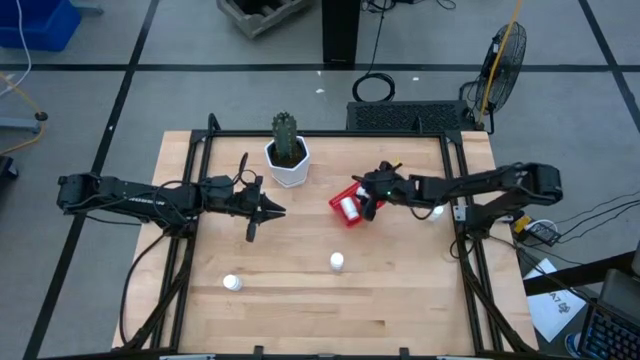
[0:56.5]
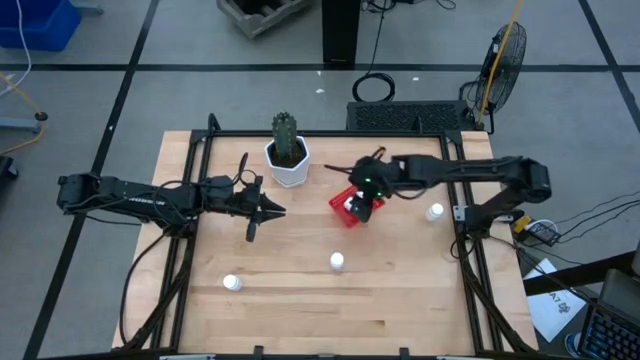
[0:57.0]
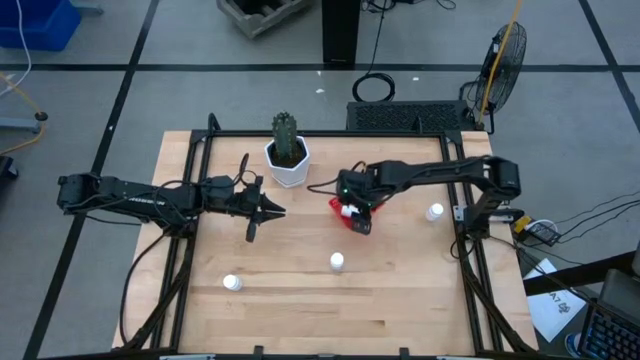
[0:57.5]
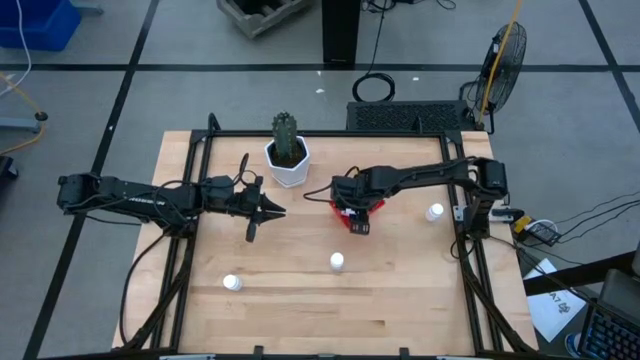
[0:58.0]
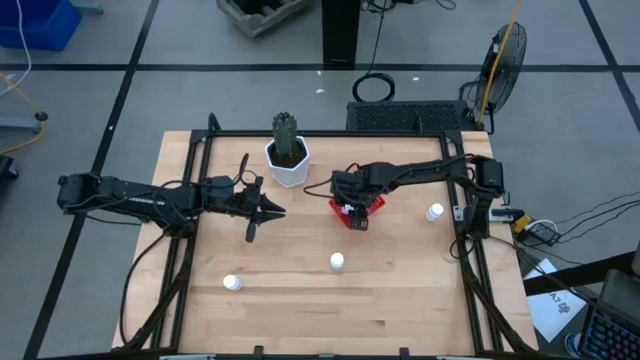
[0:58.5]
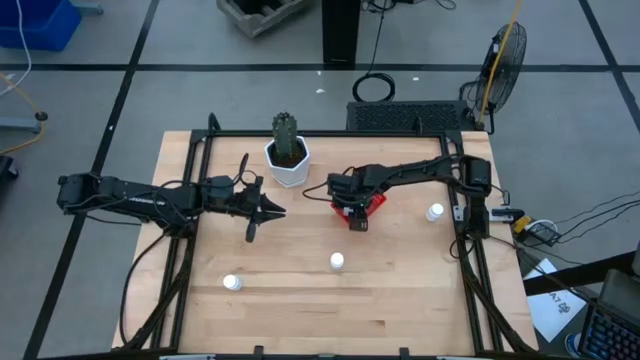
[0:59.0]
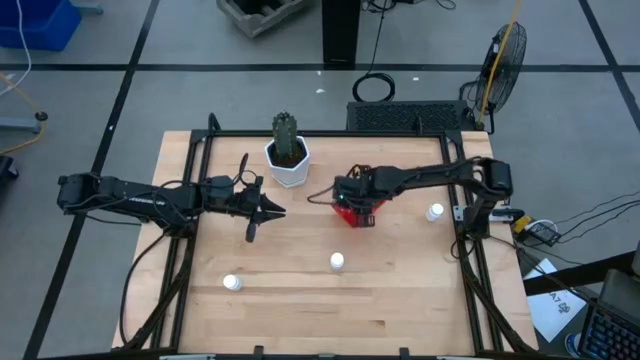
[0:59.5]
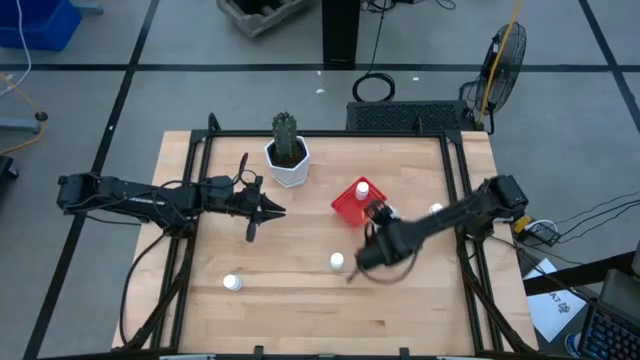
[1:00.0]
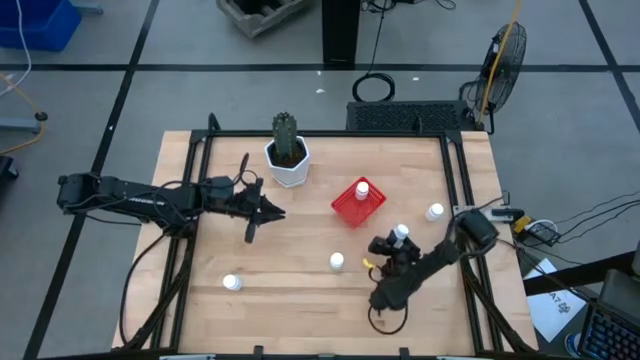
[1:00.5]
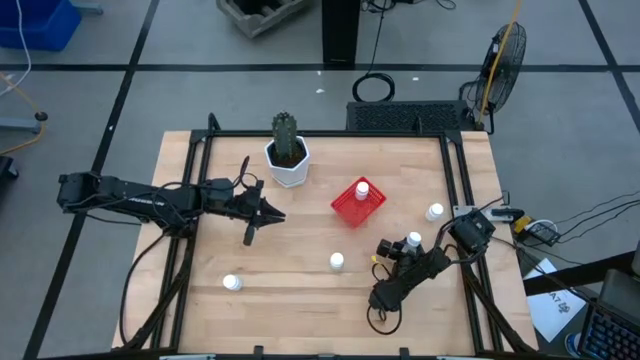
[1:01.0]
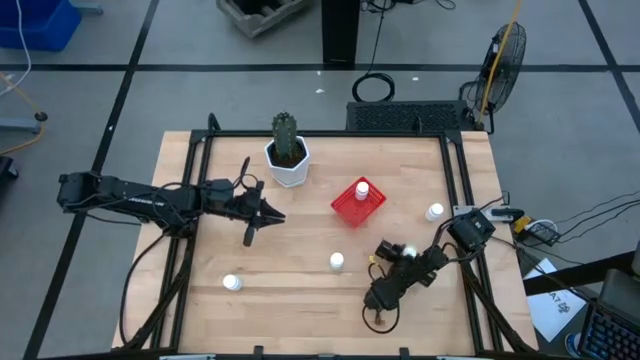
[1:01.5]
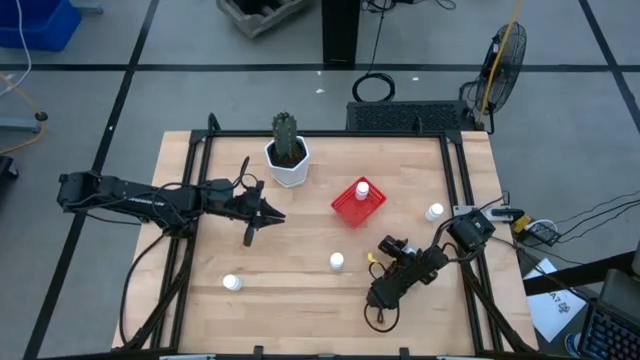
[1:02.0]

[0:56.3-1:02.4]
Task: Pick and place pill bottles into a basket
Remove the white pill bottle from the red bin

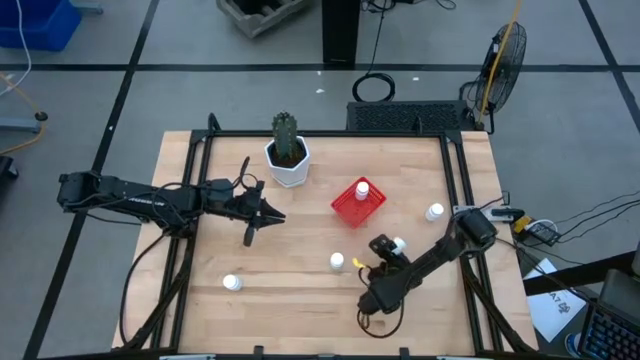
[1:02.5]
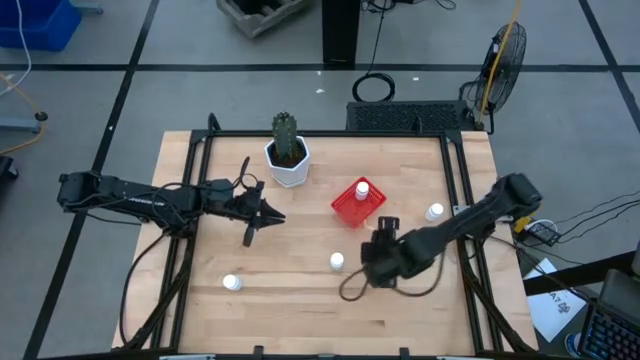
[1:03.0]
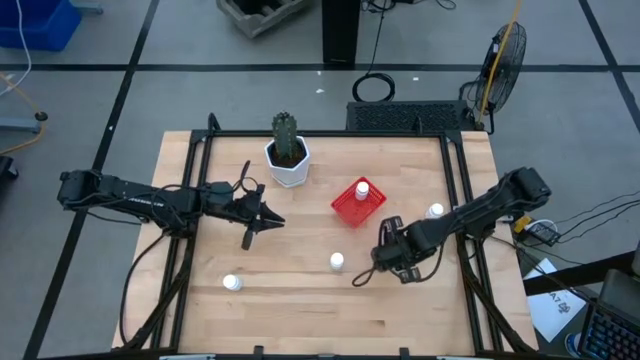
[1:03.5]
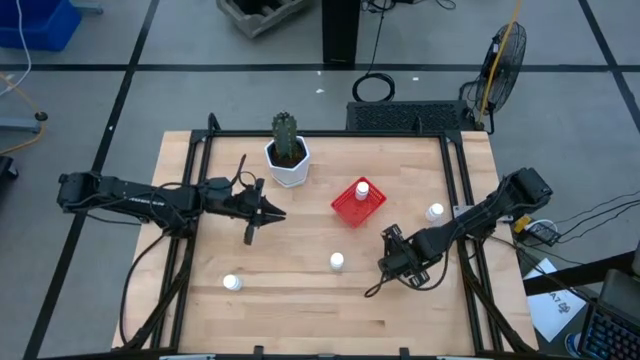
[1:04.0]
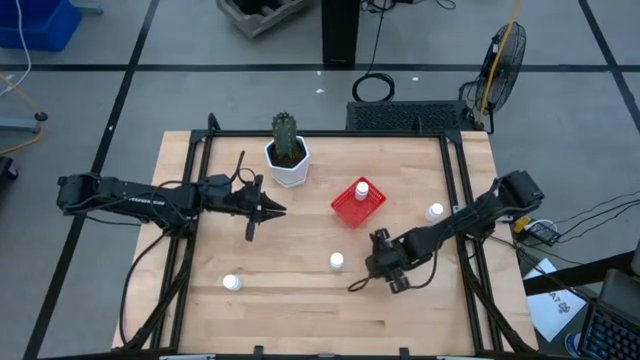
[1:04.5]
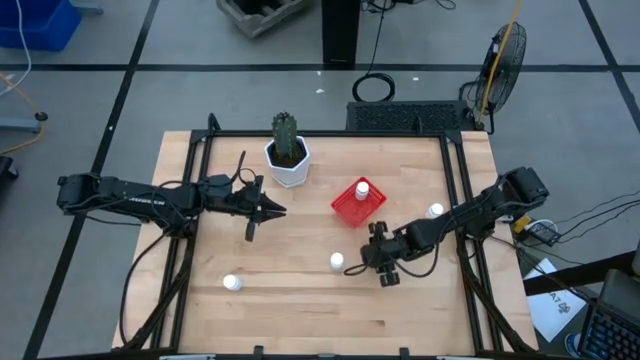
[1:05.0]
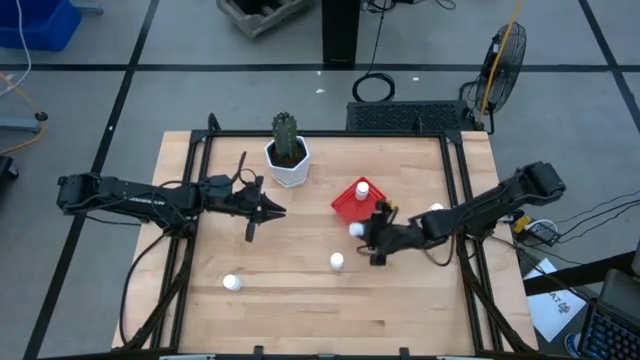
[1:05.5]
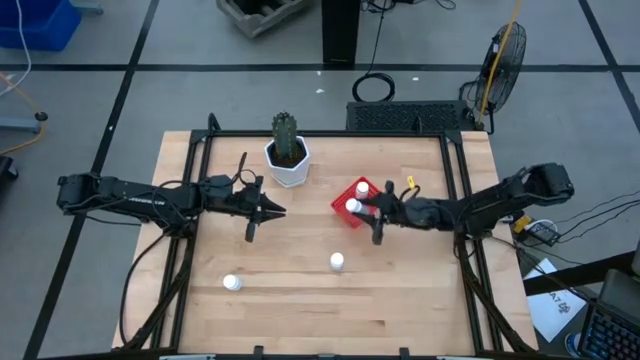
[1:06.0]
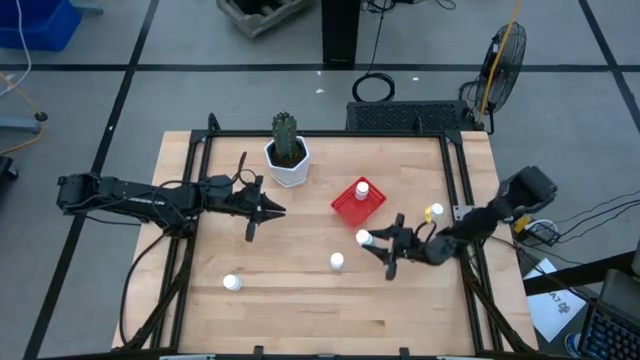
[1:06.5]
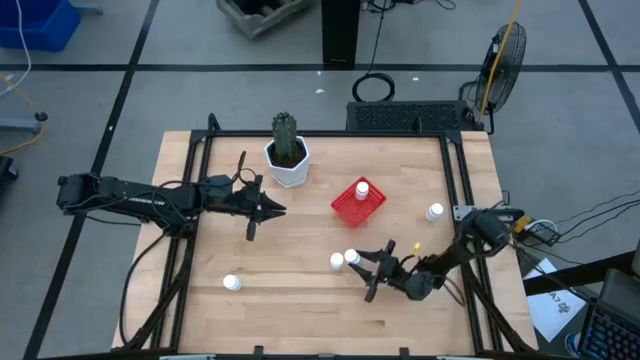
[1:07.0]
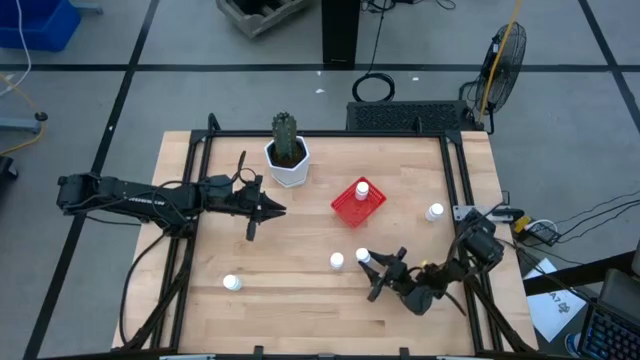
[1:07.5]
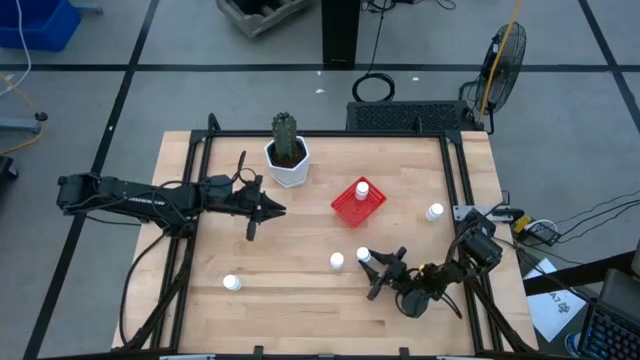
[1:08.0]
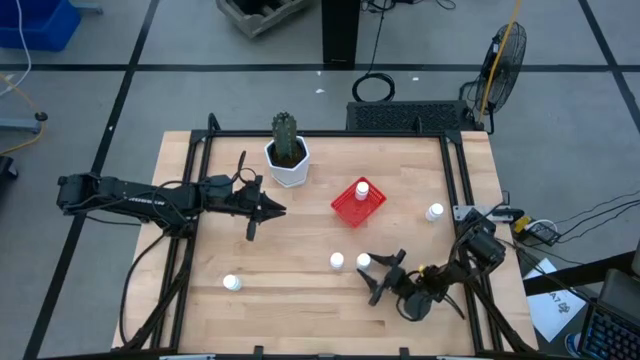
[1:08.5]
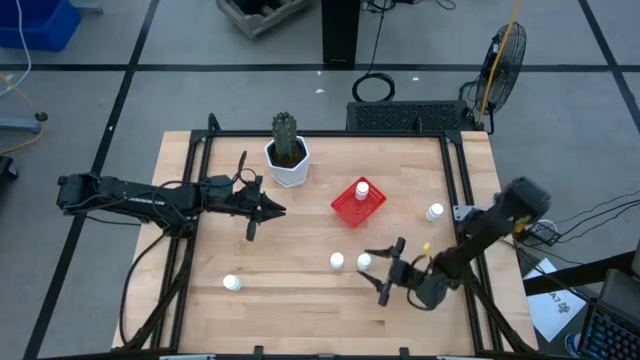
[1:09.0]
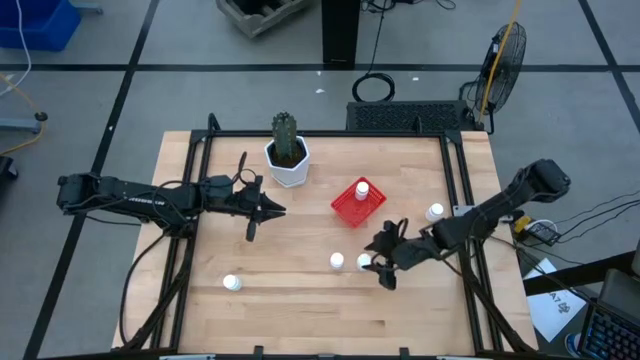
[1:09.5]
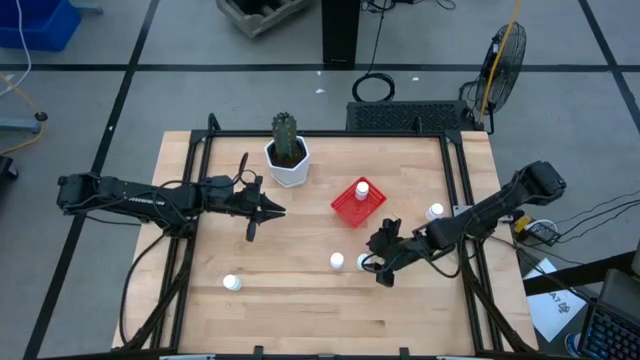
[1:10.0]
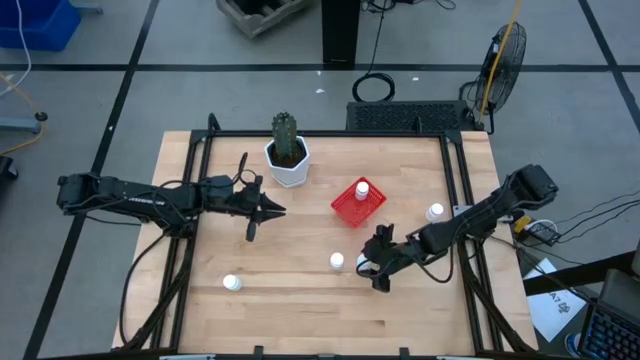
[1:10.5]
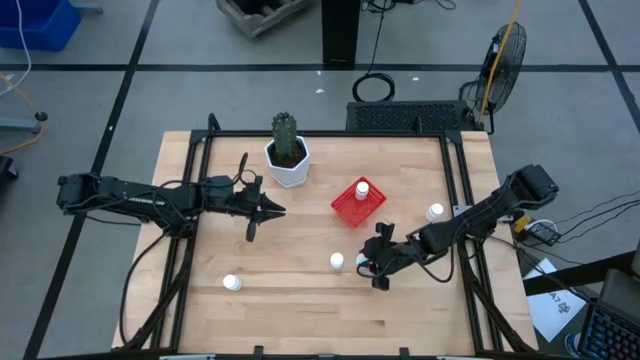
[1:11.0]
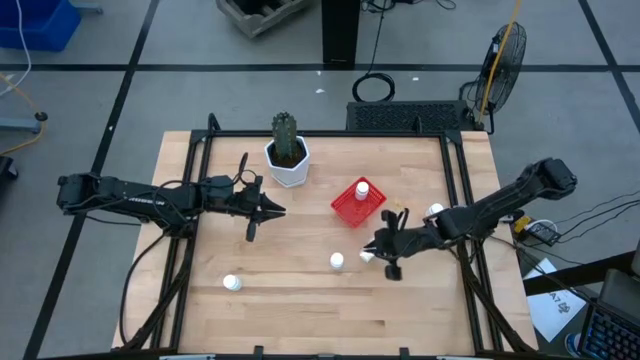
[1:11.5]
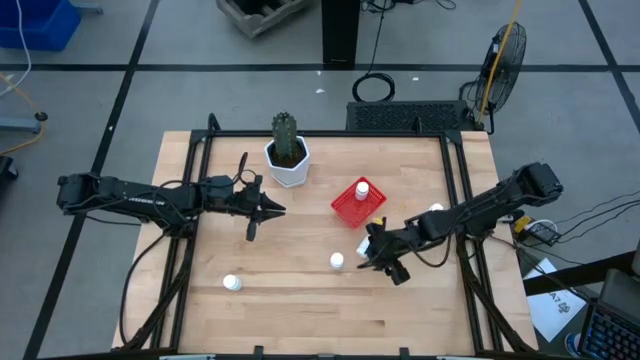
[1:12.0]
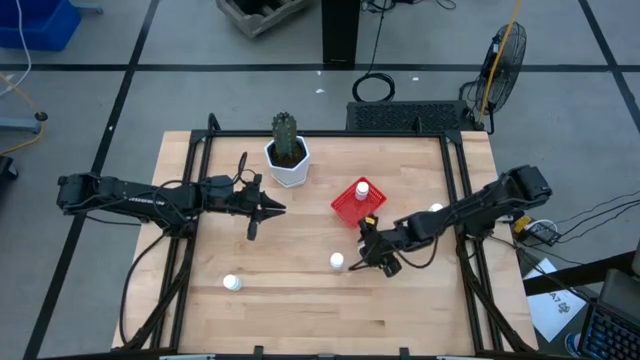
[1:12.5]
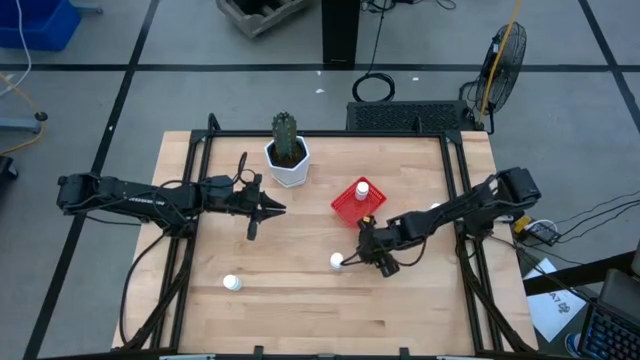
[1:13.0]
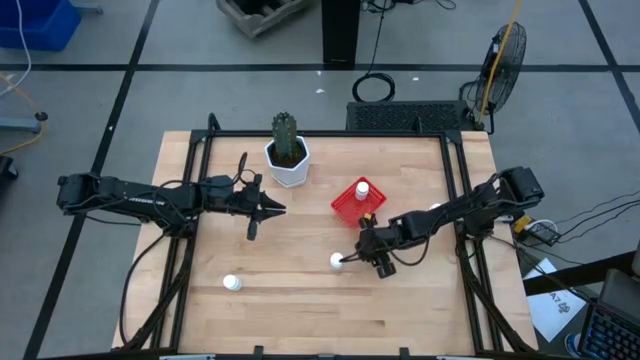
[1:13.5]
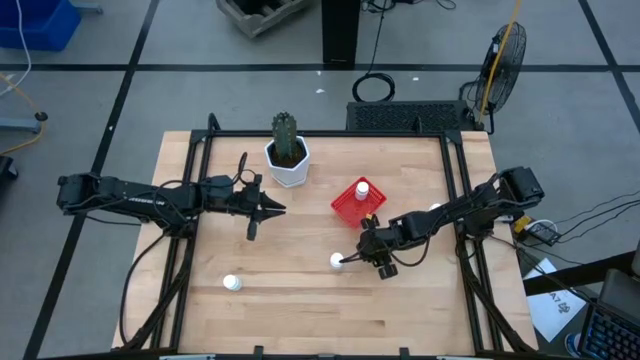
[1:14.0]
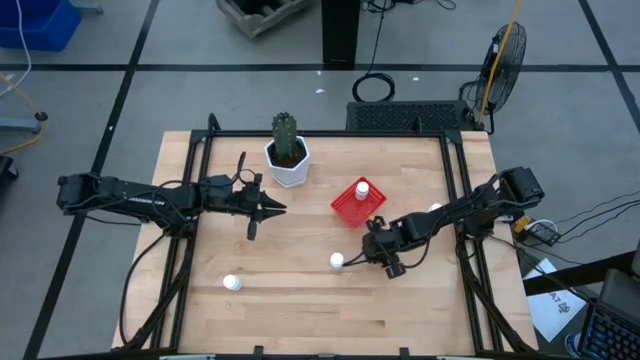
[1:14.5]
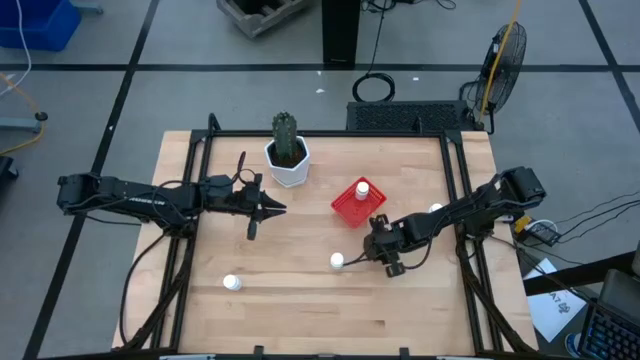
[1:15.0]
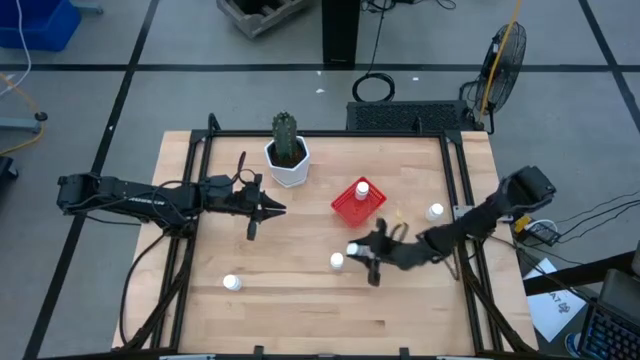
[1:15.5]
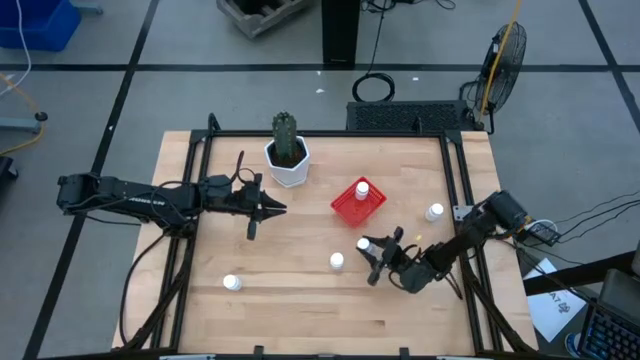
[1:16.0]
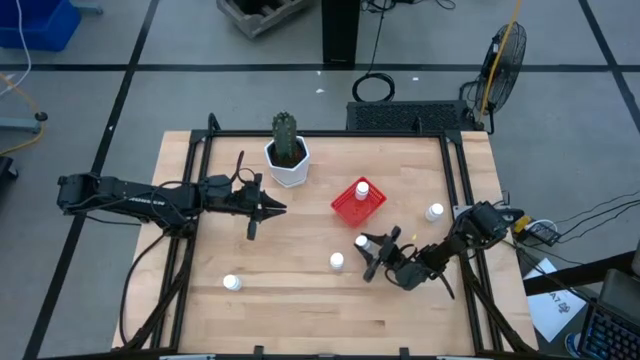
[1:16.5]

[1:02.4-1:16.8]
Put the white pill bottle into the red bin
